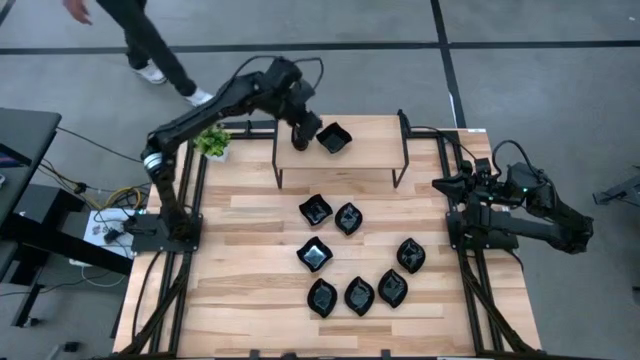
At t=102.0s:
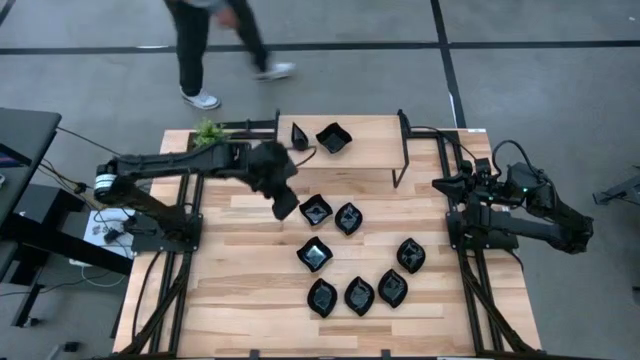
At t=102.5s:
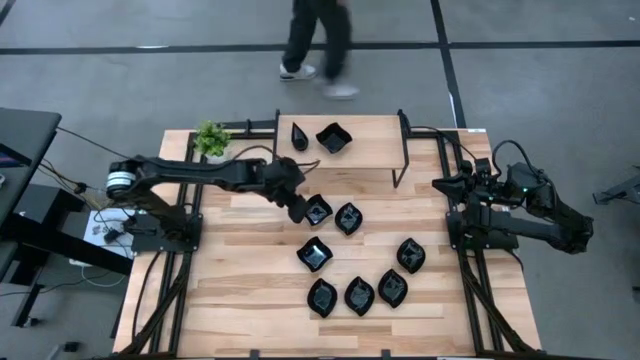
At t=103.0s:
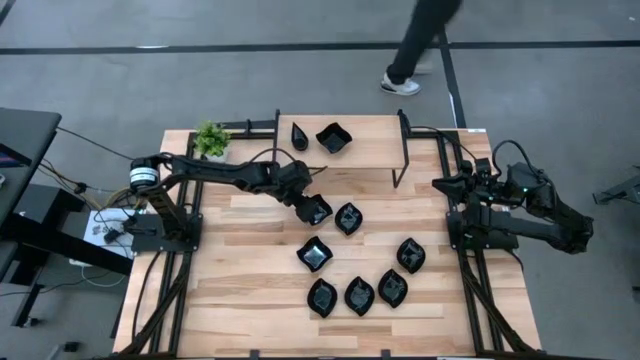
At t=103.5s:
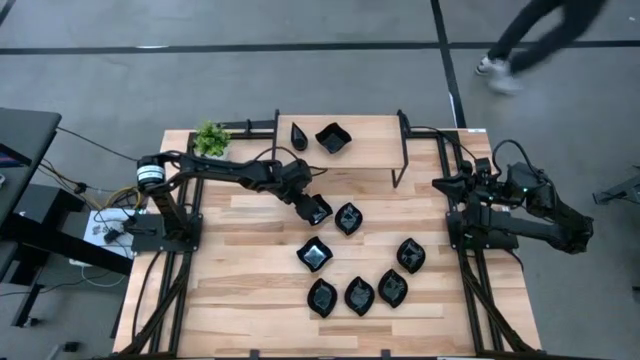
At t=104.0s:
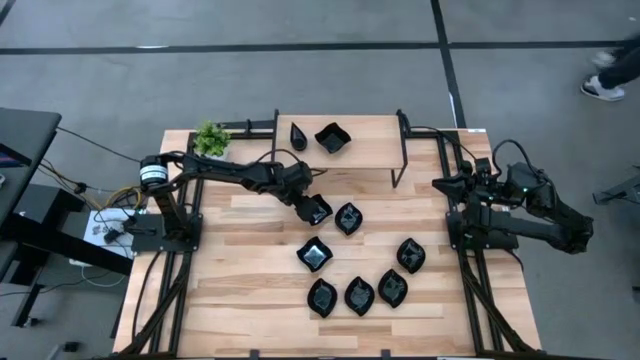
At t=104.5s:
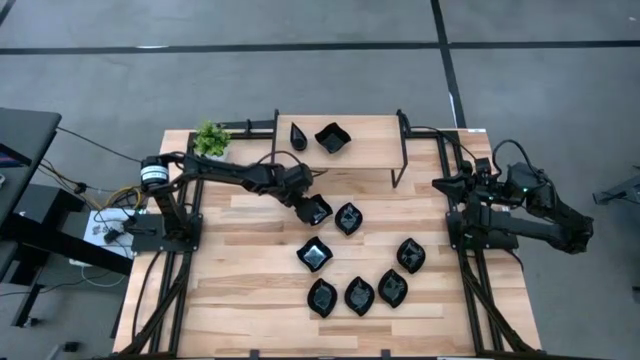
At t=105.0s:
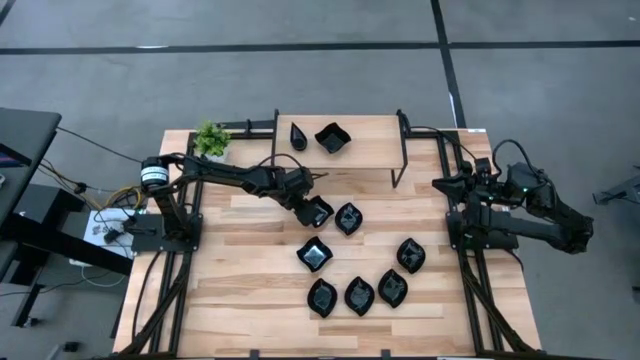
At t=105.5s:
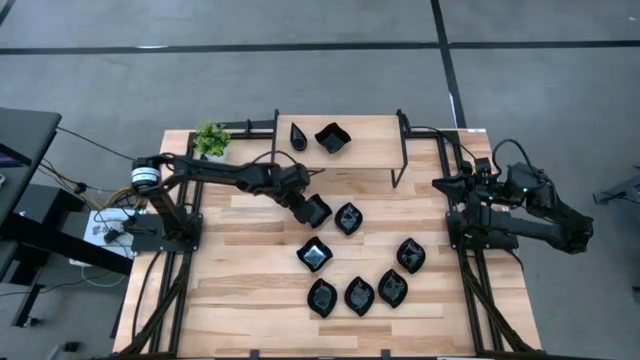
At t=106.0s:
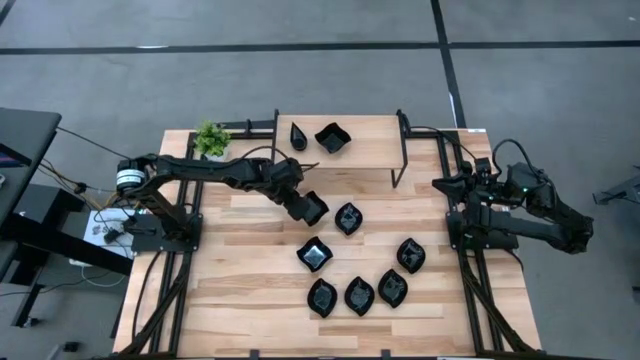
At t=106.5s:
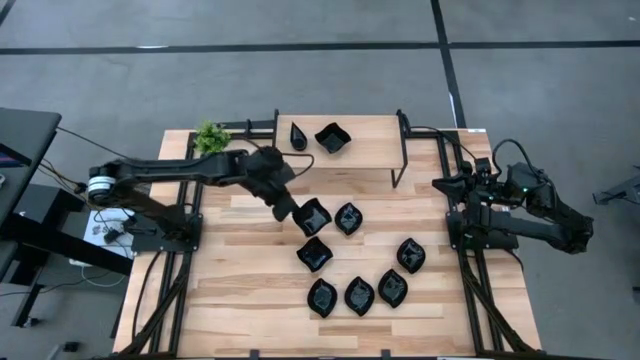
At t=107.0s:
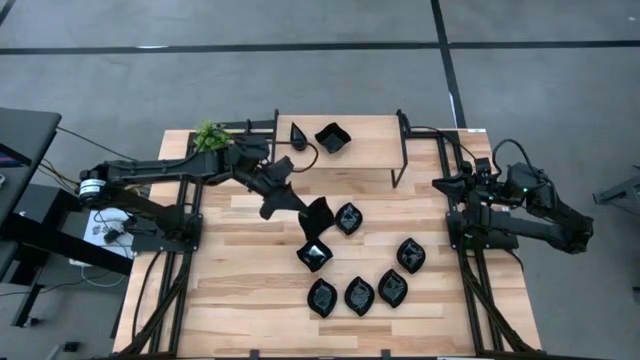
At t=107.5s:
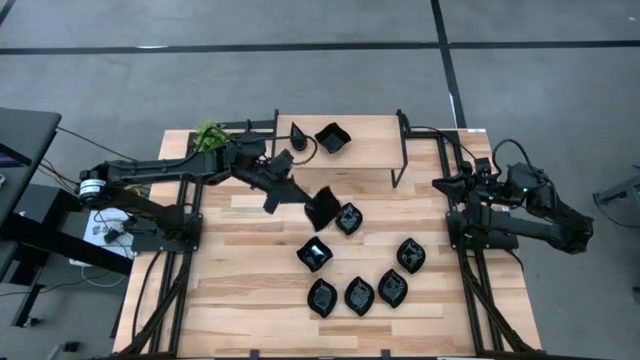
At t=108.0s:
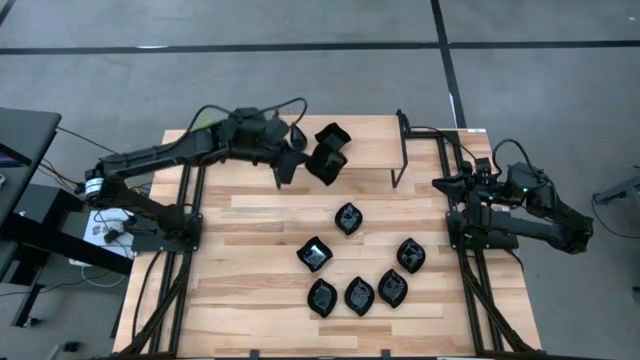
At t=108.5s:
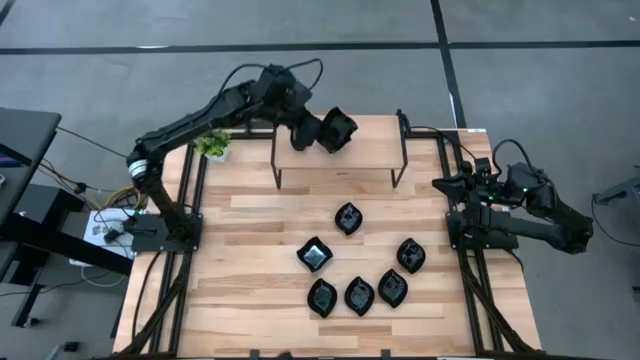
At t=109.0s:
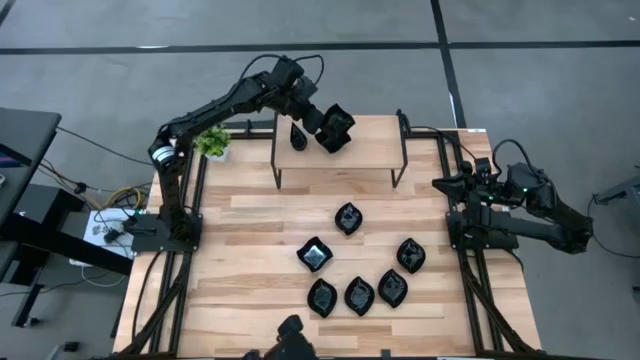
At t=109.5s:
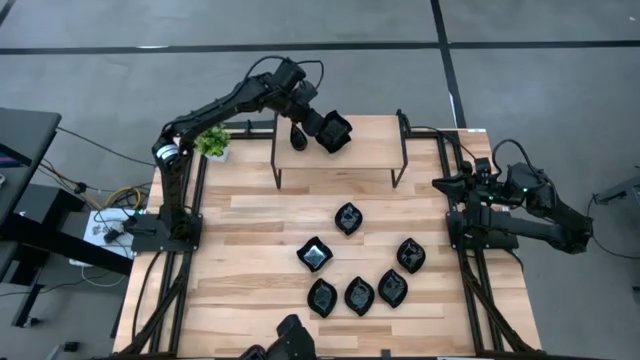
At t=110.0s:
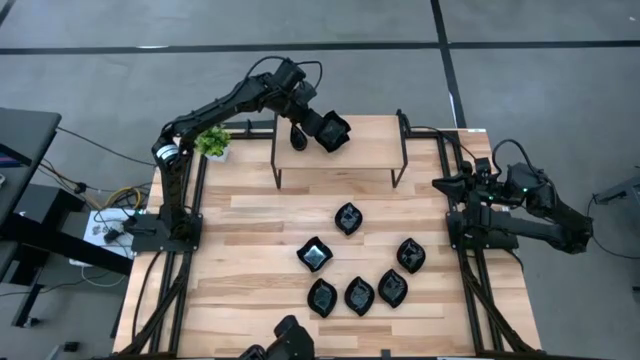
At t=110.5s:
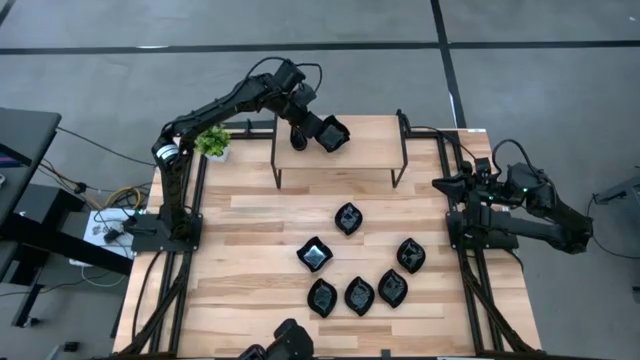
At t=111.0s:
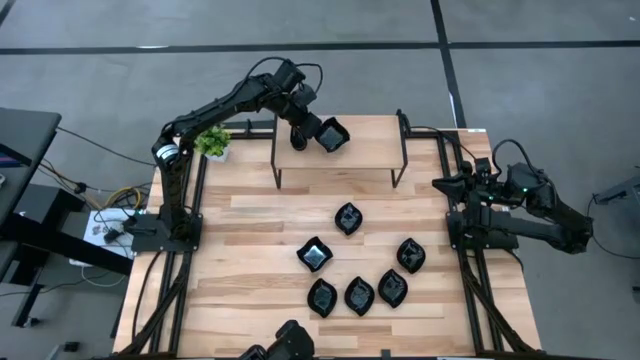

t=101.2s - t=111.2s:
Task: Pick & Place Mini shaped plates
Stack the distorted square plate on top of the distorted square plates on the shelf

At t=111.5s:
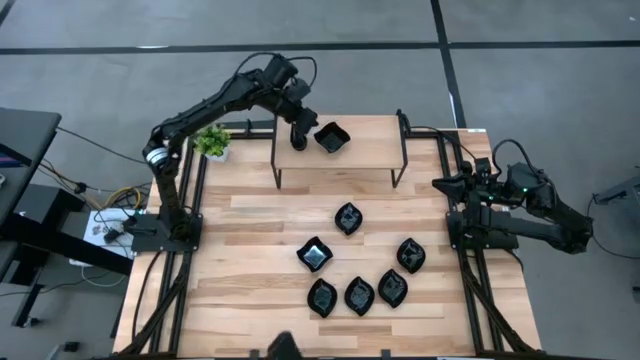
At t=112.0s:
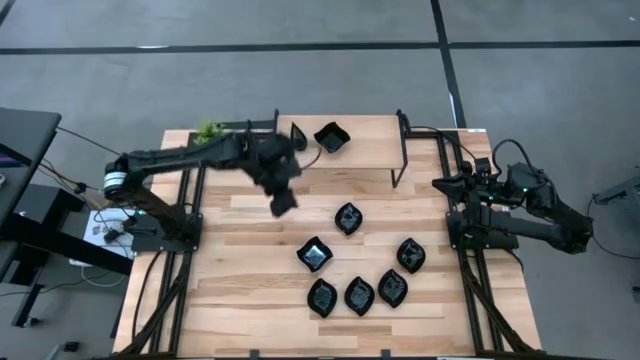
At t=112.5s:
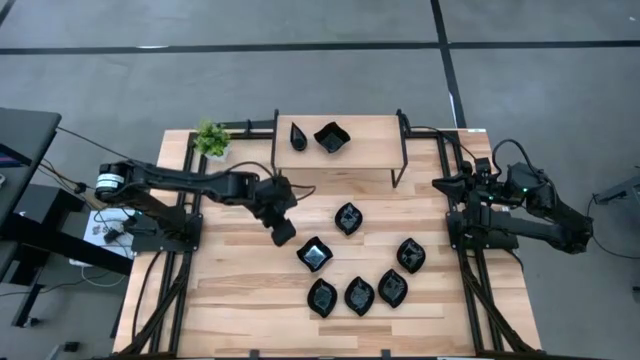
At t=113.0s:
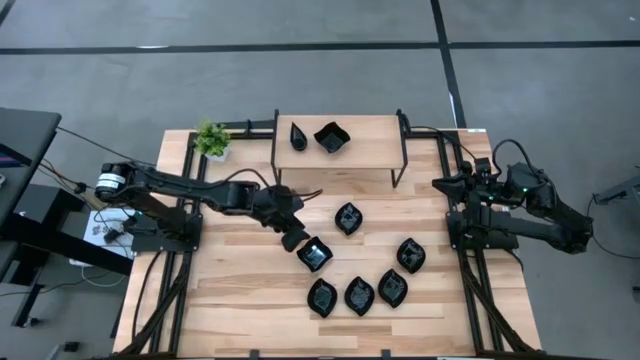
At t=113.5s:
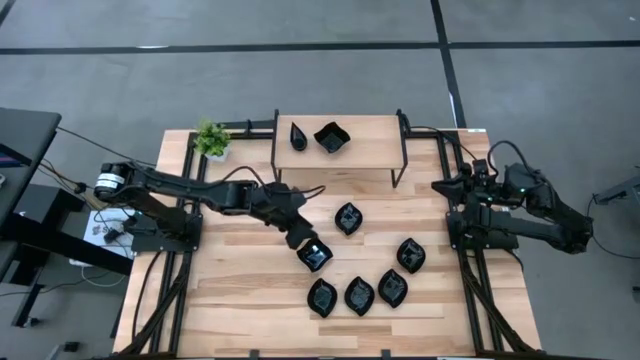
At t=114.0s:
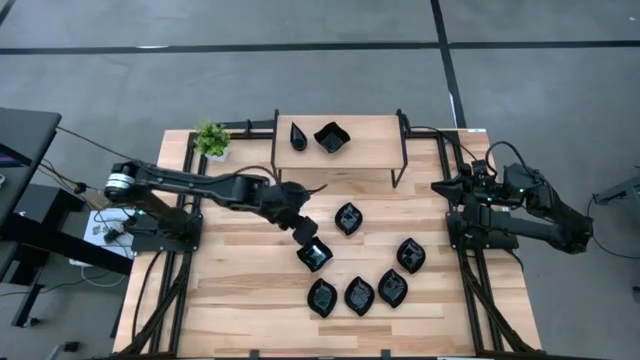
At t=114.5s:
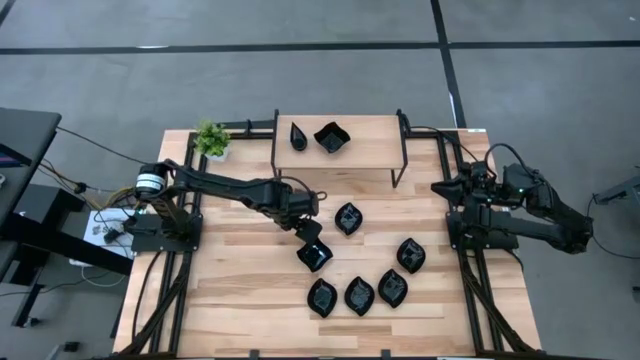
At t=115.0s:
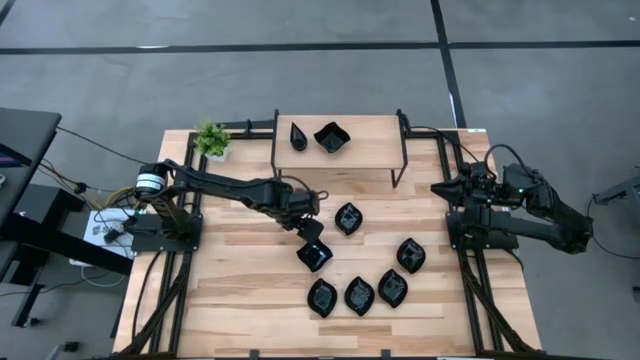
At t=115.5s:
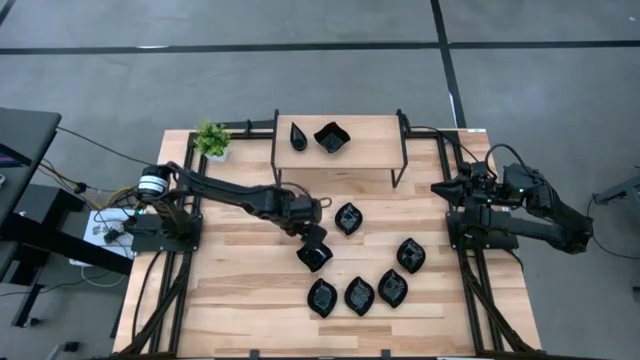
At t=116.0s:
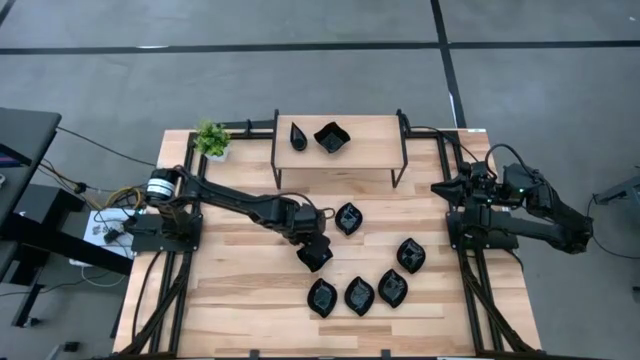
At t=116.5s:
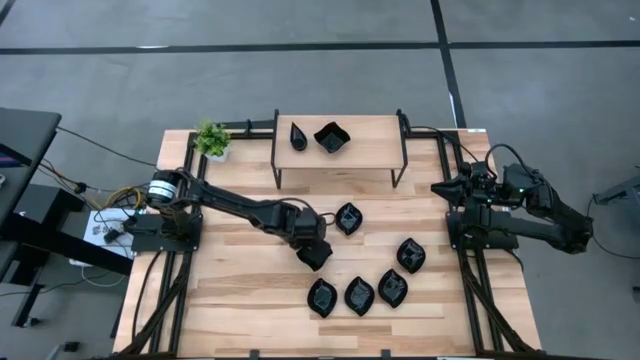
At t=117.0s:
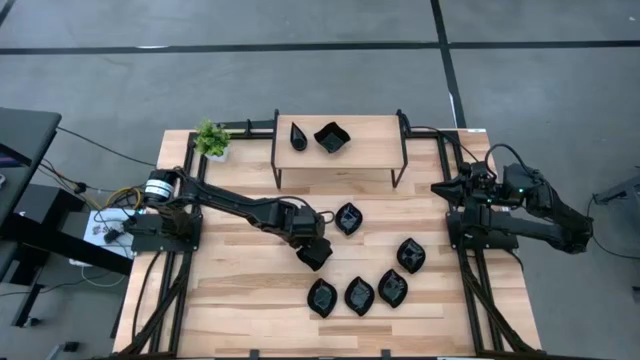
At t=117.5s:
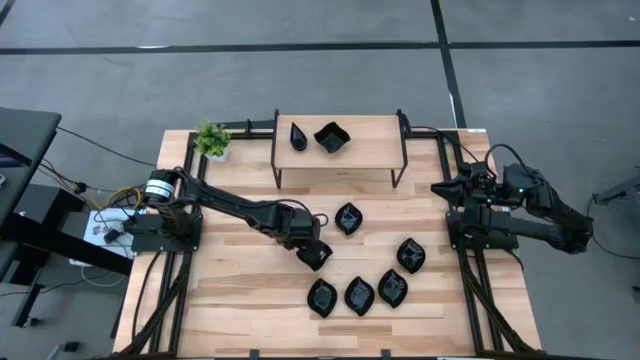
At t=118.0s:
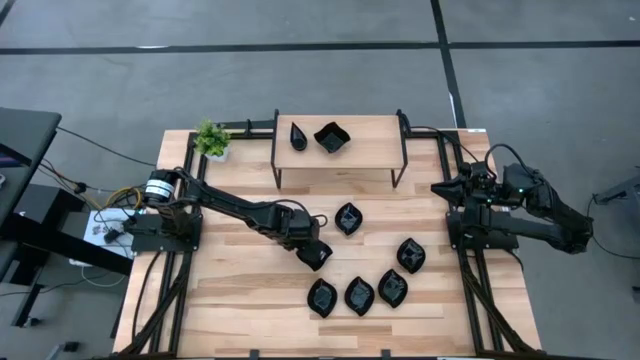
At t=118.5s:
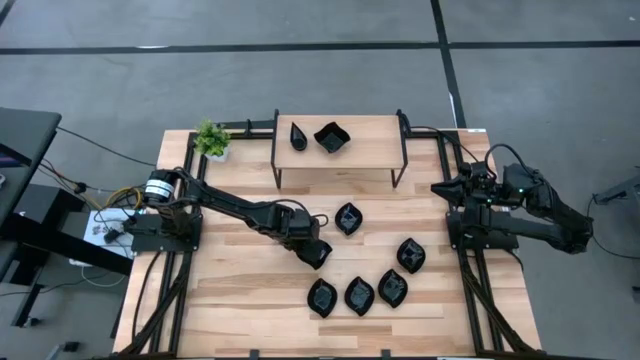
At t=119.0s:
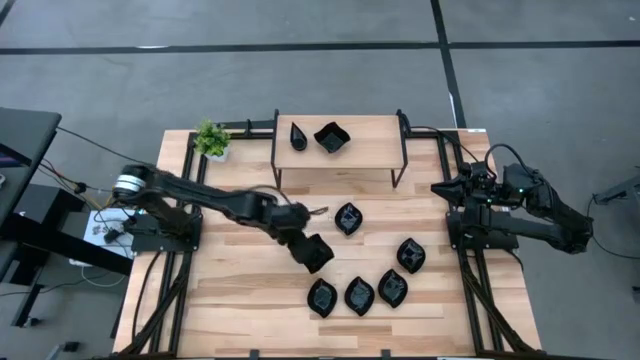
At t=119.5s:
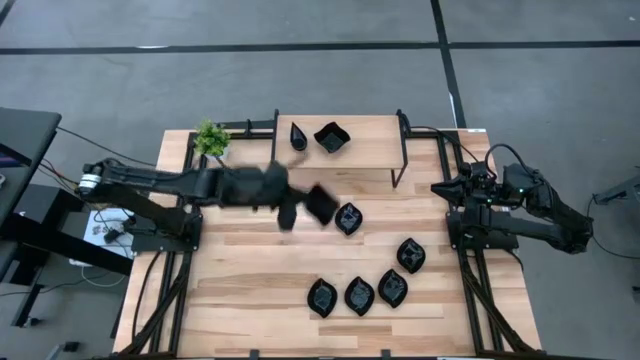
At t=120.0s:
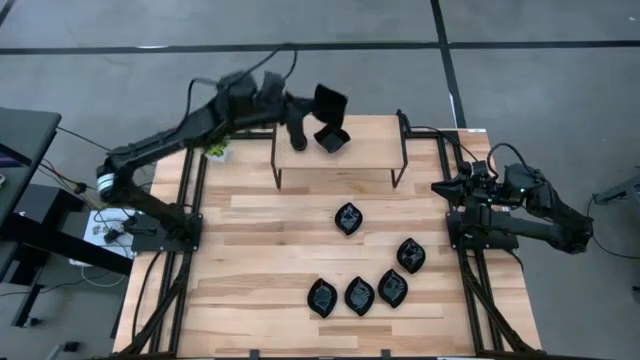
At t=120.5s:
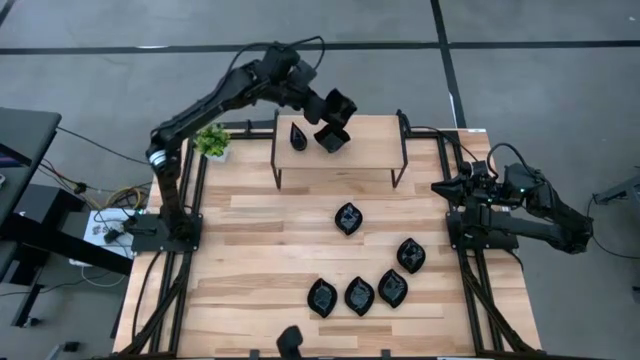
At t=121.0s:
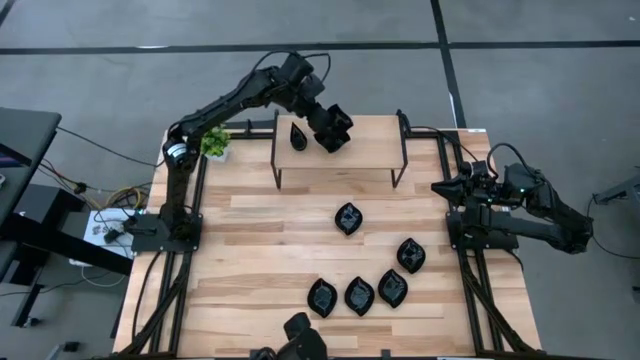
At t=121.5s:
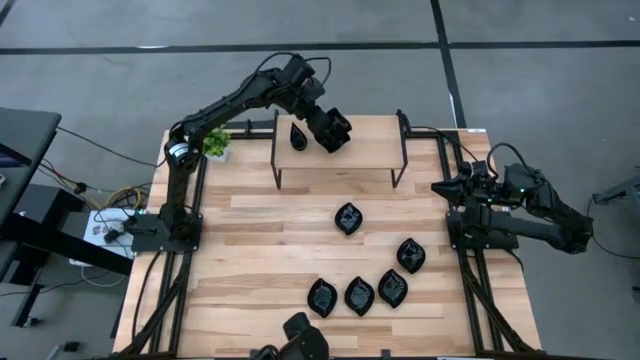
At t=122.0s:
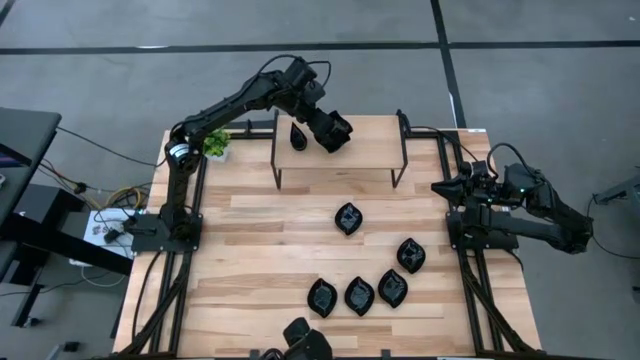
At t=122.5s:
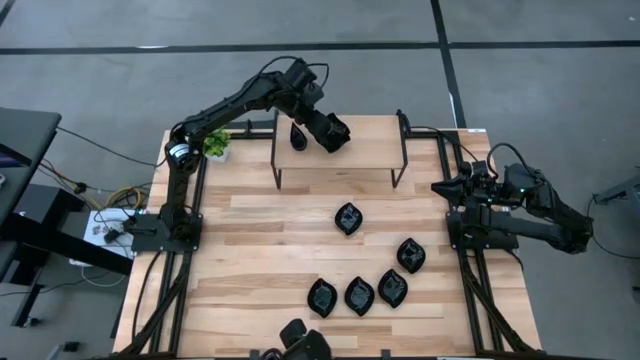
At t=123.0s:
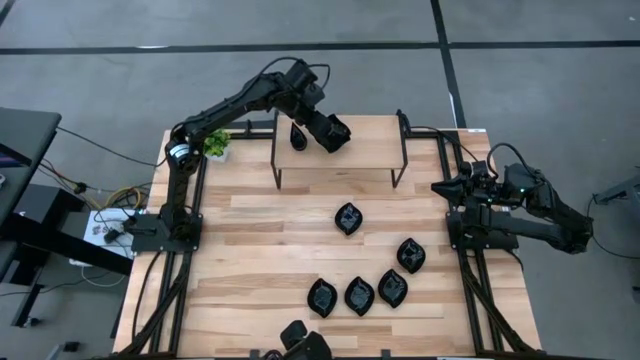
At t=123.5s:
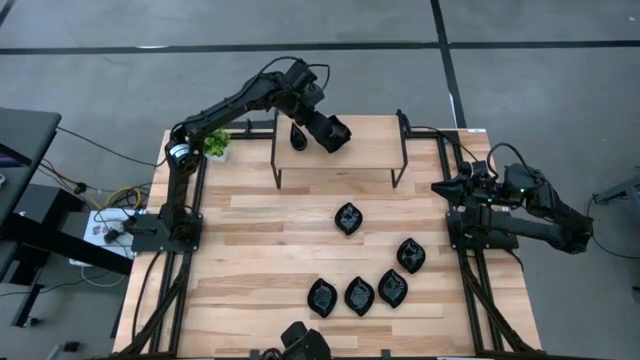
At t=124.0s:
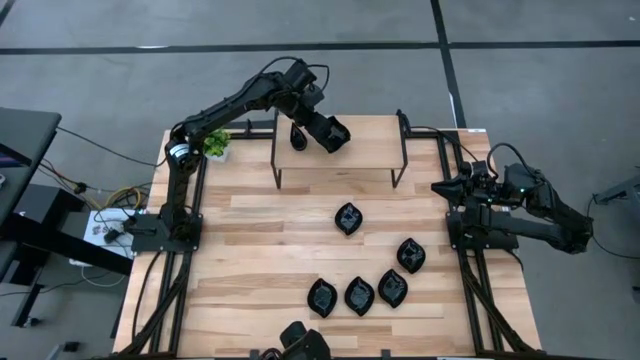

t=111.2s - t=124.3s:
Stack the distorted square plate on top of the distorted square plates on the shelf
